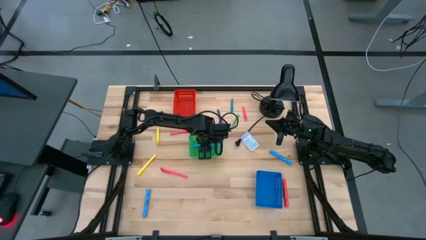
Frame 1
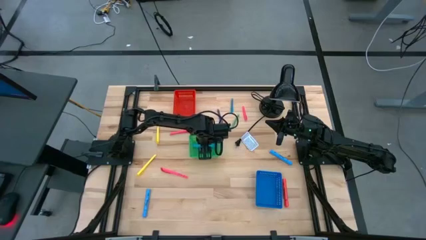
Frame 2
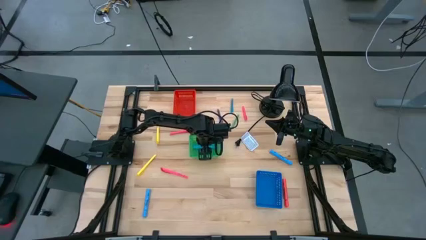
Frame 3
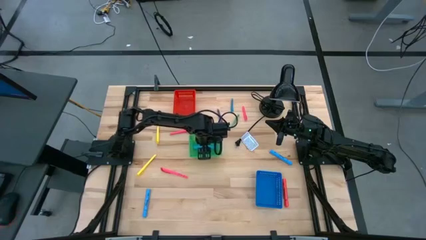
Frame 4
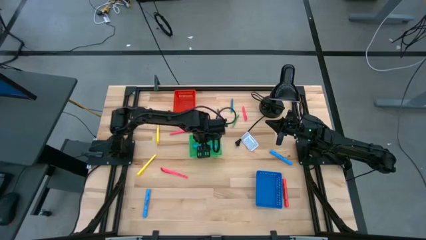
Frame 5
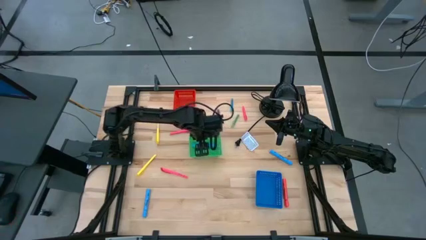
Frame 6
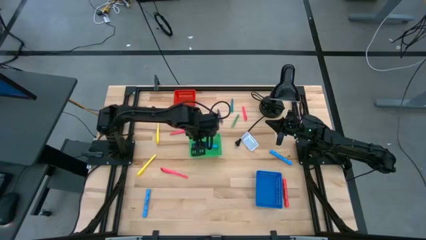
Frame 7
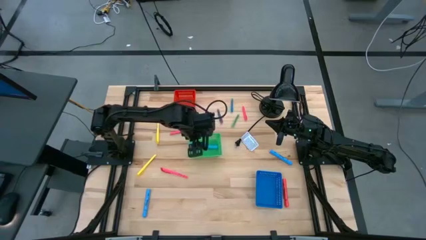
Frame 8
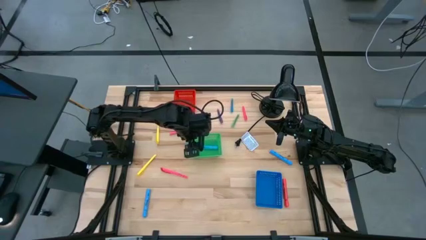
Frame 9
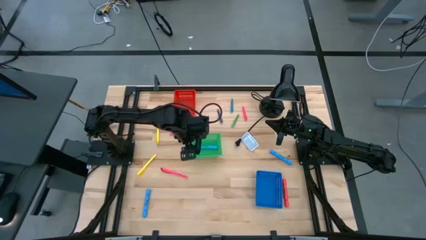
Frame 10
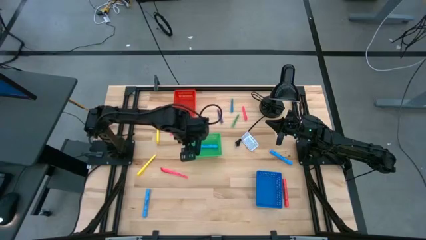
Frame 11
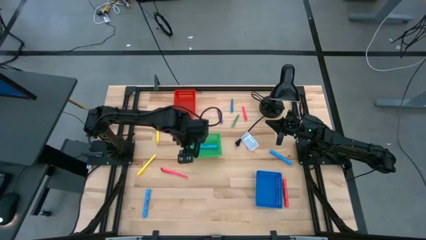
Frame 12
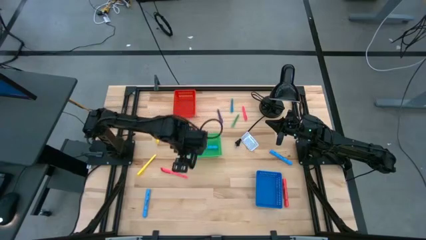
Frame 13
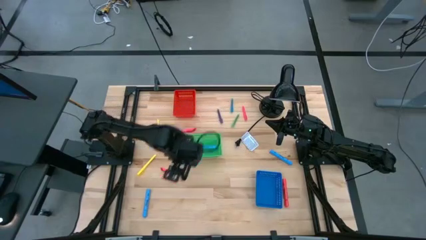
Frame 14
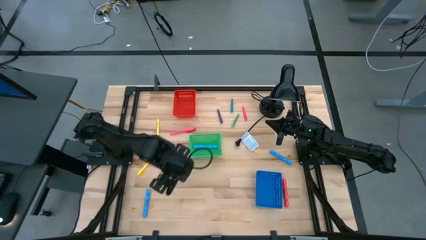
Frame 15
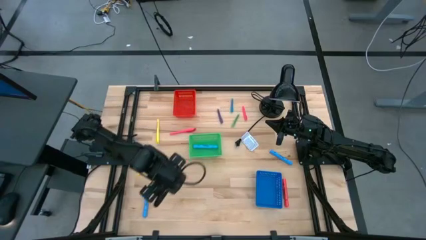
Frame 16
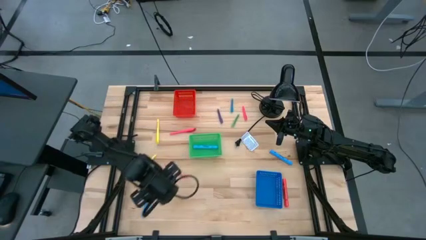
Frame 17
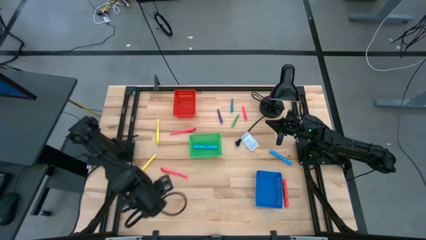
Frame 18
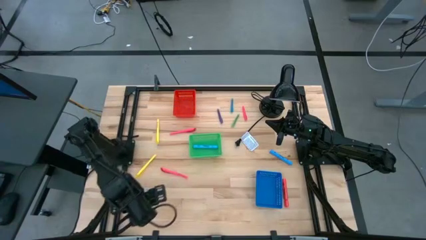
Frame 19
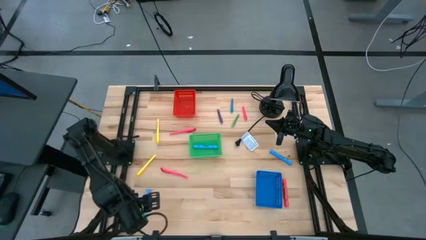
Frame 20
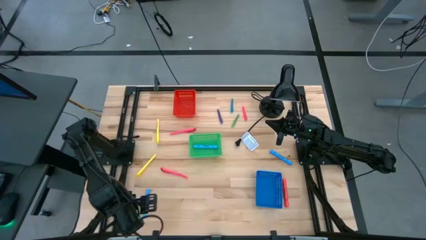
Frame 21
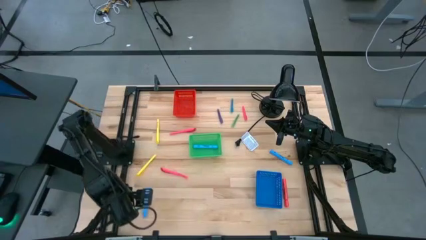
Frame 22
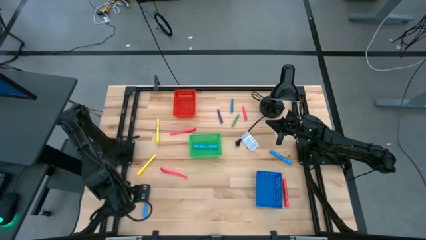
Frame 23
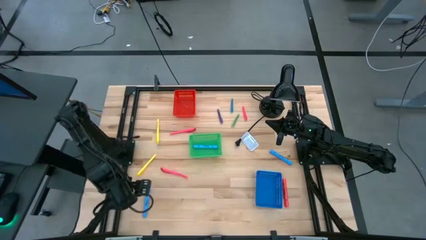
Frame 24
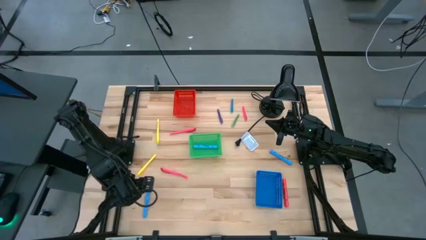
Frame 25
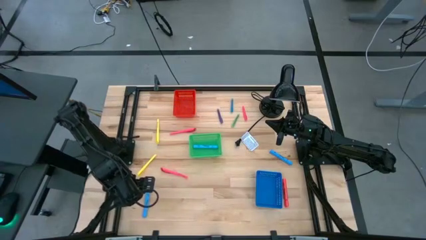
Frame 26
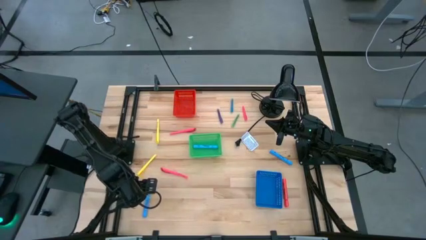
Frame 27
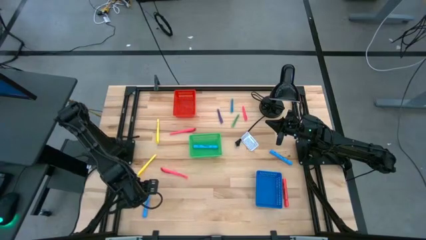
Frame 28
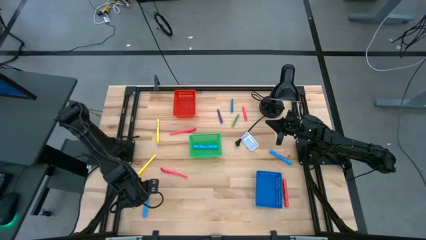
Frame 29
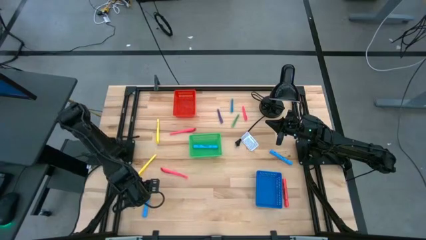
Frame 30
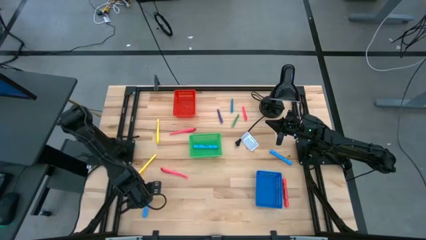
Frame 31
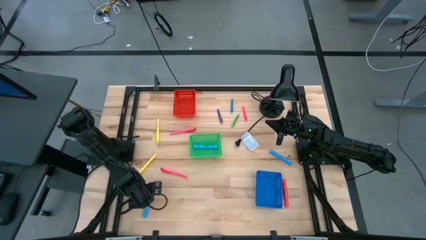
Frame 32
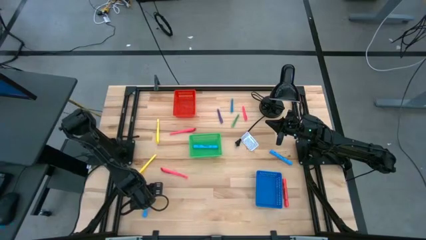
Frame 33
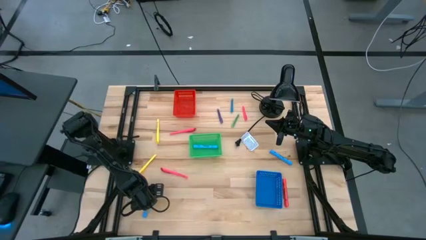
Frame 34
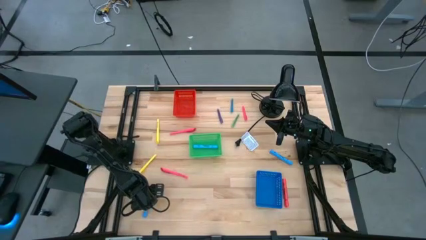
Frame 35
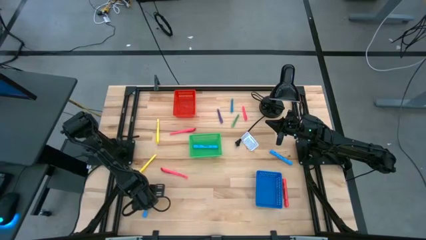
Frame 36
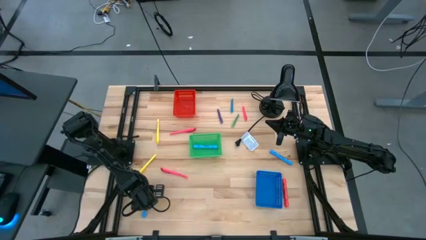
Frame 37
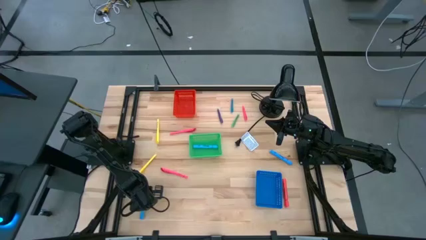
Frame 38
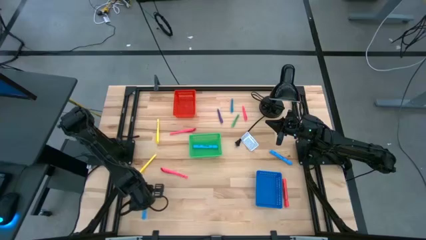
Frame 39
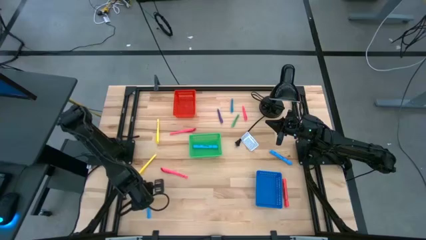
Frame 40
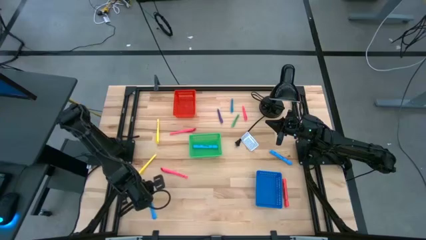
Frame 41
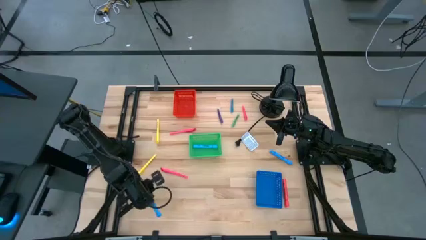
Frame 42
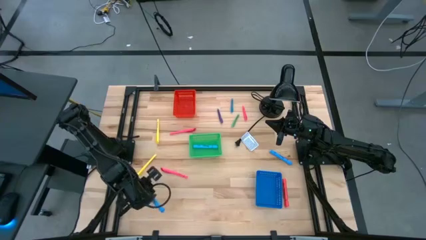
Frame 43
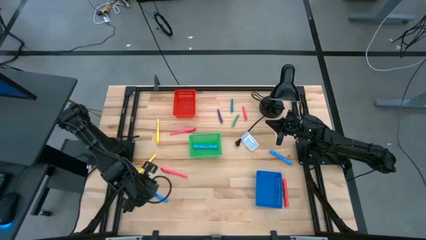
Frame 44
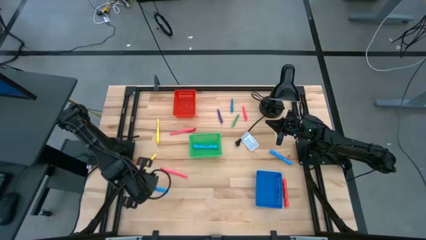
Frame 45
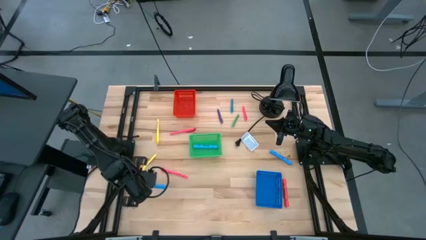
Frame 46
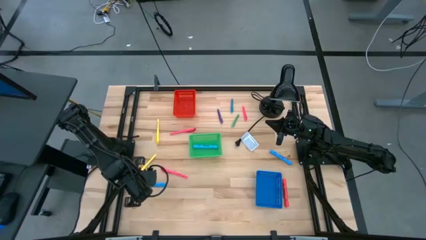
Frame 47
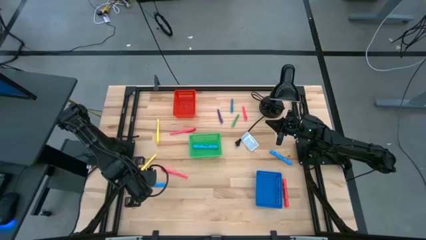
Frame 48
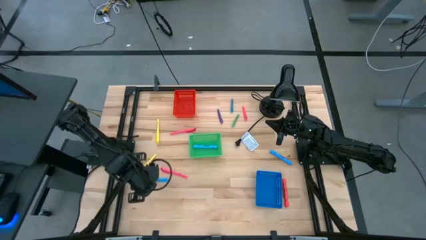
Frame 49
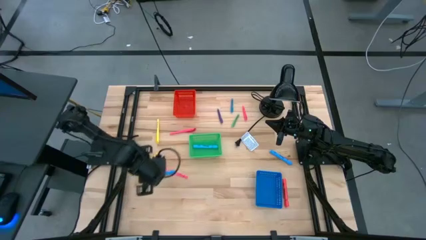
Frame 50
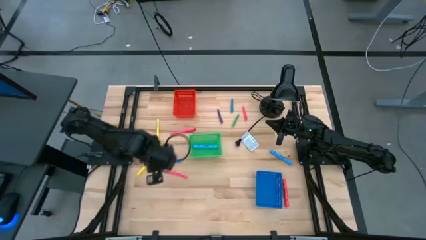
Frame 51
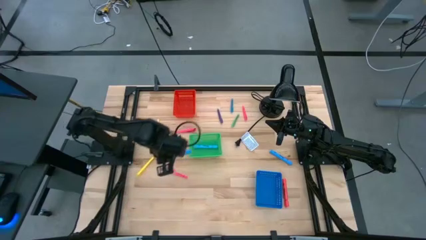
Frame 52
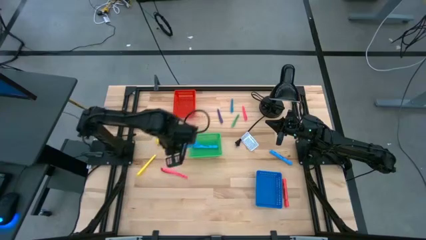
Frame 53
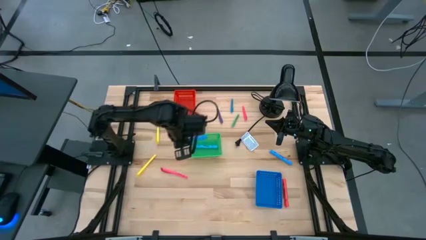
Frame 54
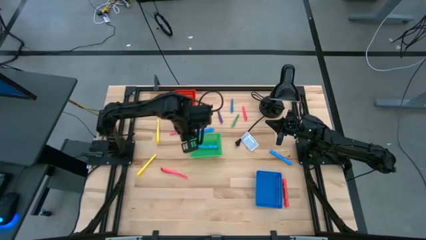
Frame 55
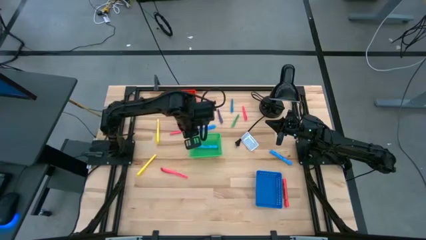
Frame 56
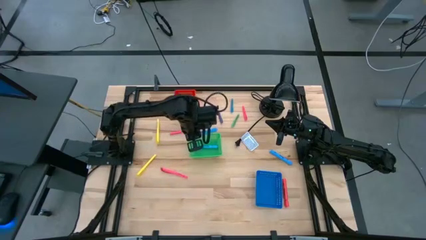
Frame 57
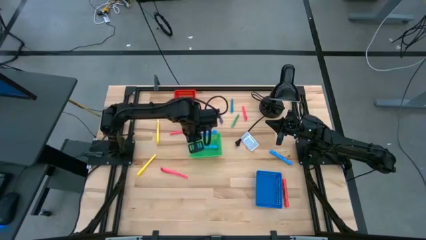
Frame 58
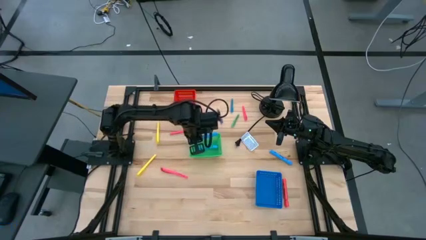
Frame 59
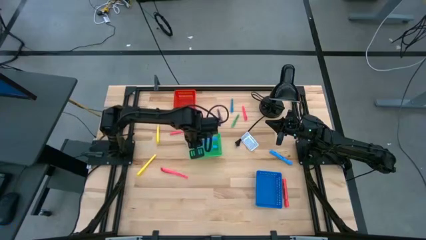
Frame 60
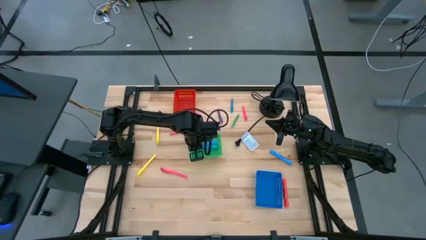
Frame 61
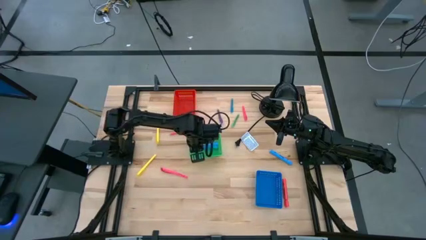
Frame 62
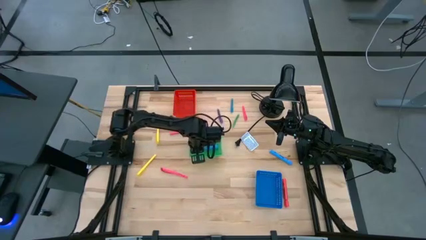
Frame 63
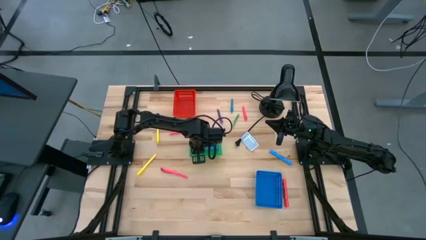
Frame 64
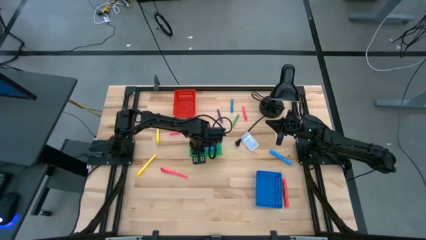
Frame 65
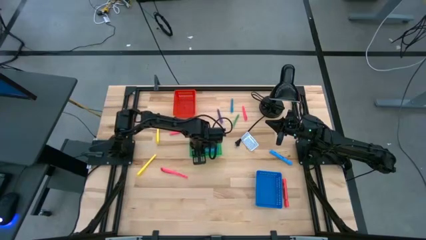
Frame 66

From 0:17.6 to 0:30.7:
Task: Pick & Place Markers
Put the bottom blue highlighter pen into the green bin

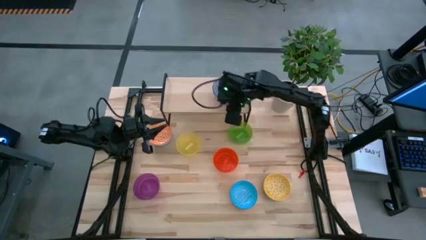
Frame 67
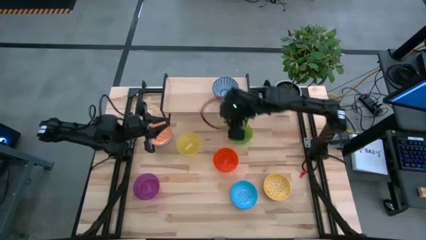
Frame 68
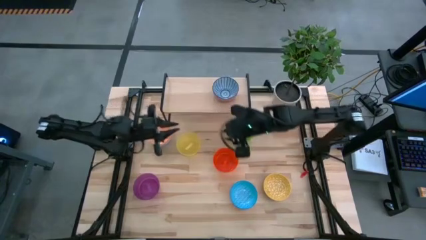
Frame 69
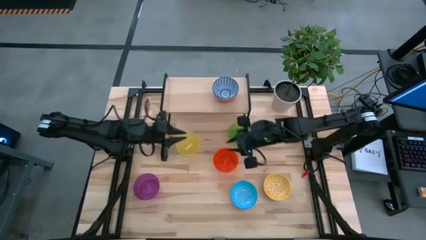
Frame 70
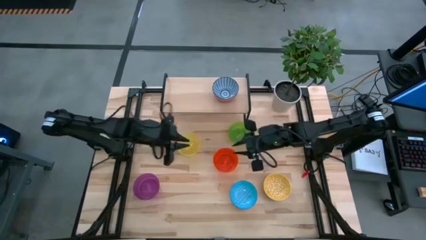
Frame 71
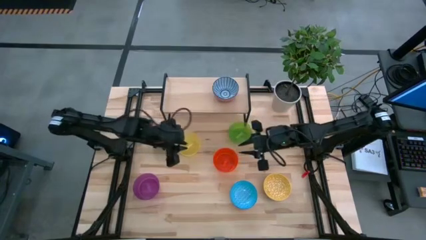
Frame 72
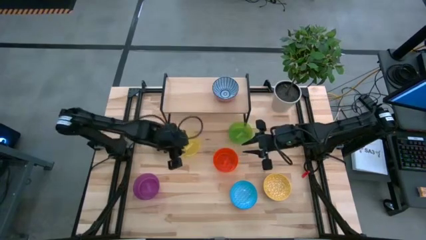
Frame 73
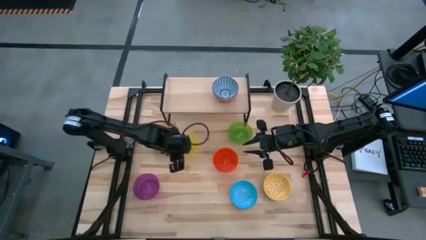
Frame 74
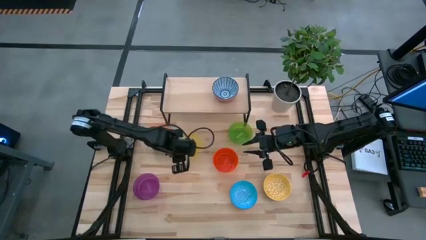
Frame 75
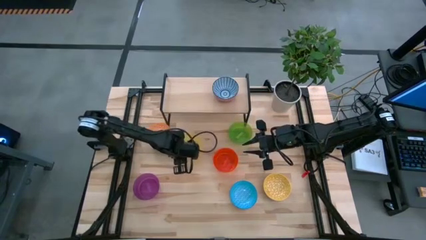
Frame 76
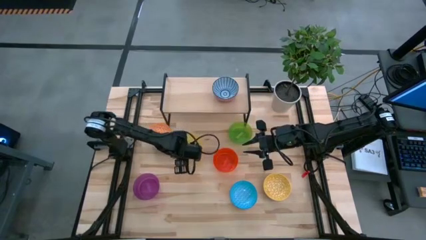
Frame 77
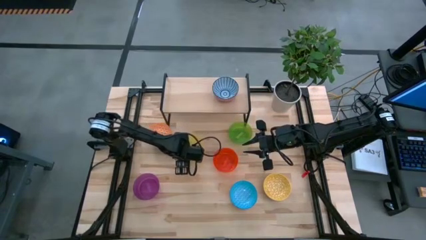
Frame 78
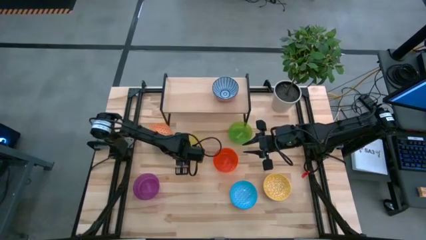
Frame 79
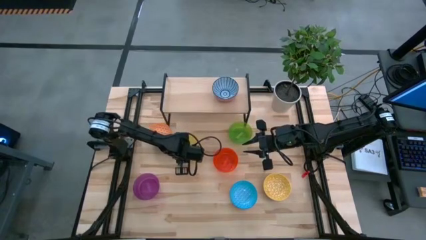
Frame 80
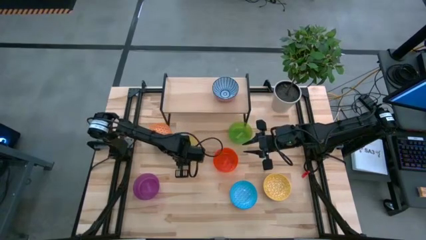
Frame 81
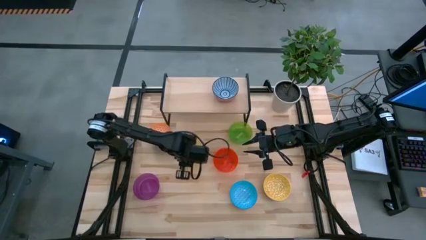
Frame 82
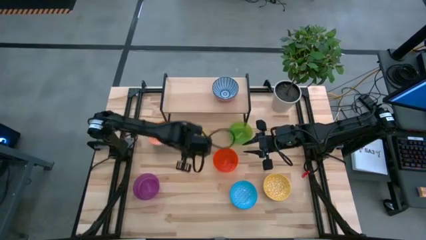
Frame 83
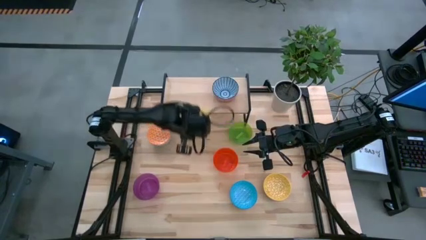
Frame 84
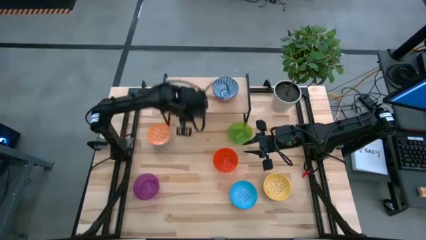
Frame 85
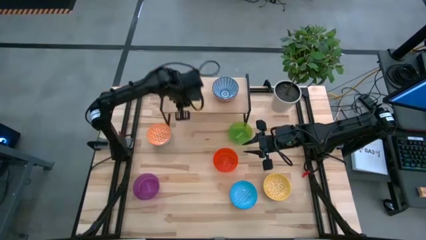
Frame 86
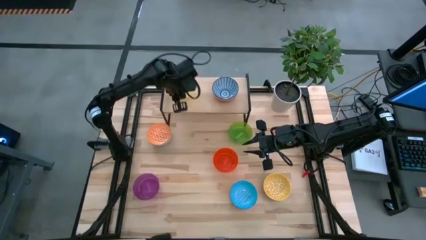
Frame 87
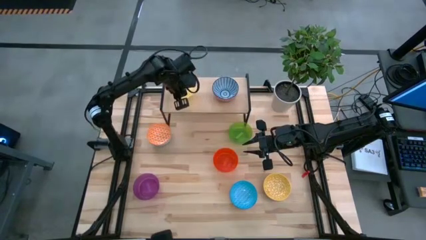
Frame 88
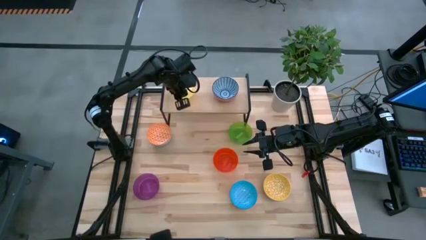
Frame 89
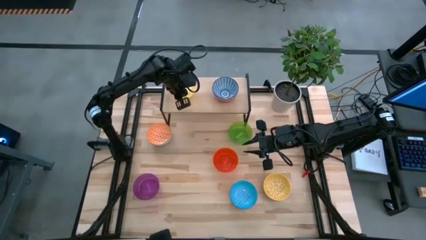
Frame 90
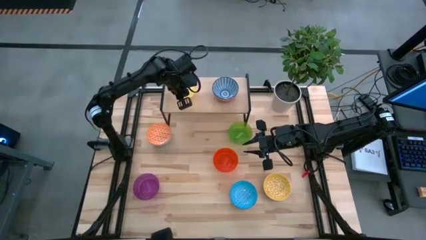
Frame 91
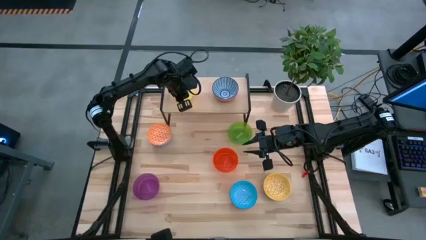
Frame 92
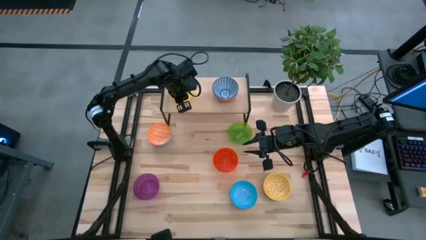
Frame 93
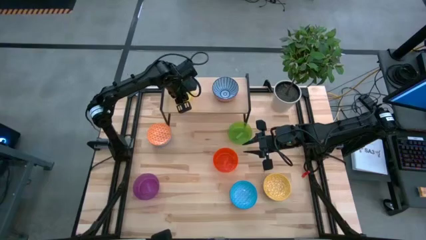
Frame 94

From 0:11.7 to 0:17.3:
Task: Place and stack bowls onto a shelf
Put the yellow bowl on the shelf
